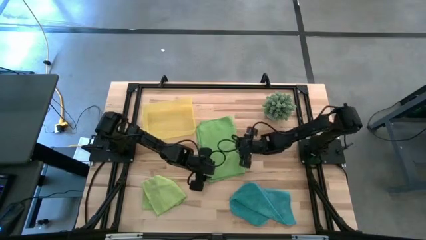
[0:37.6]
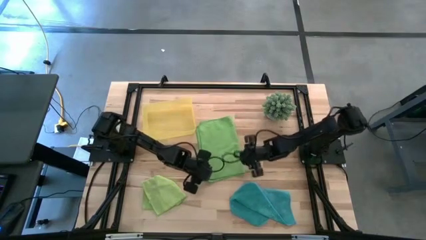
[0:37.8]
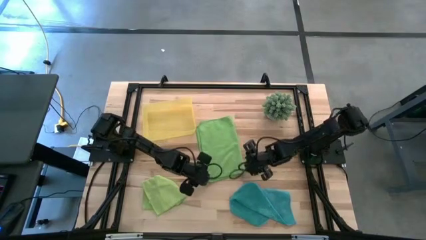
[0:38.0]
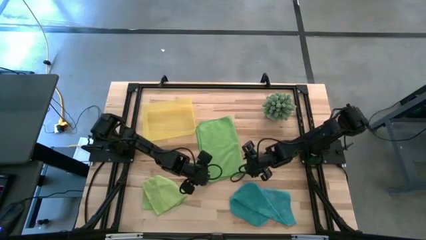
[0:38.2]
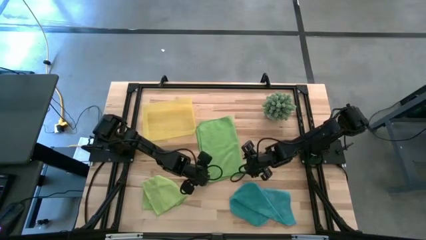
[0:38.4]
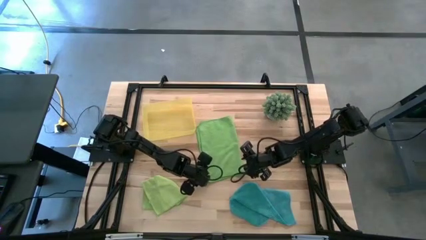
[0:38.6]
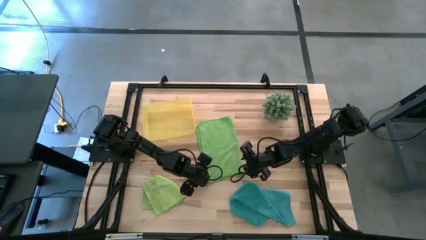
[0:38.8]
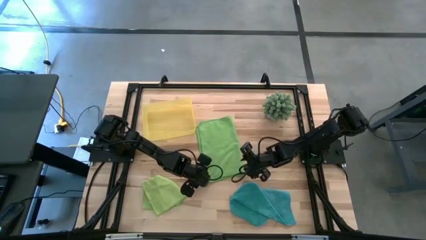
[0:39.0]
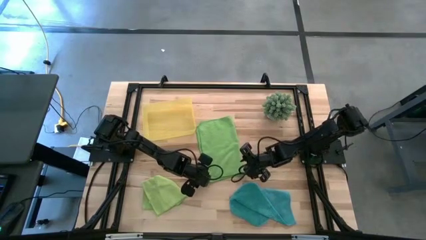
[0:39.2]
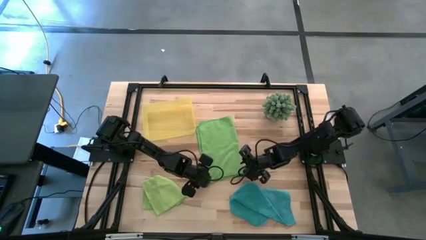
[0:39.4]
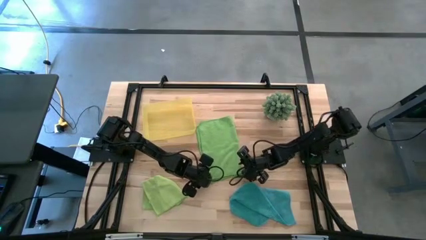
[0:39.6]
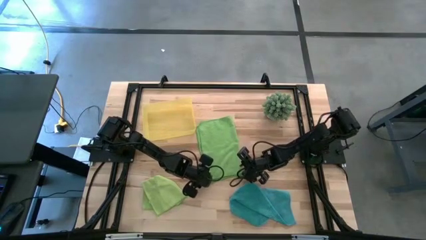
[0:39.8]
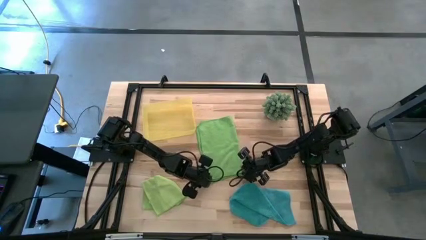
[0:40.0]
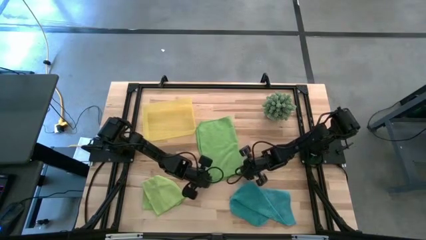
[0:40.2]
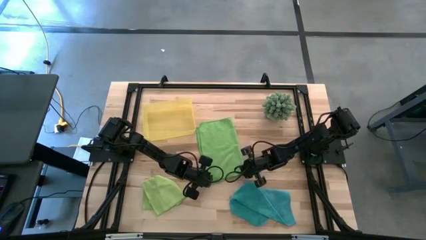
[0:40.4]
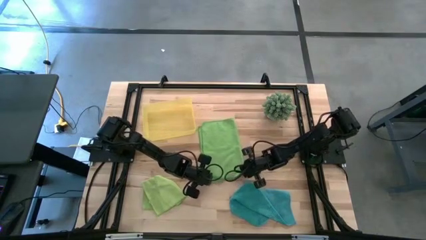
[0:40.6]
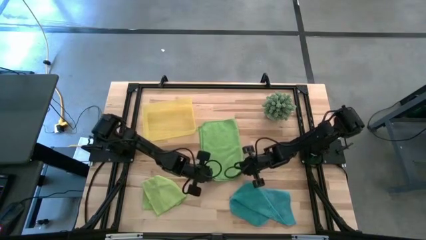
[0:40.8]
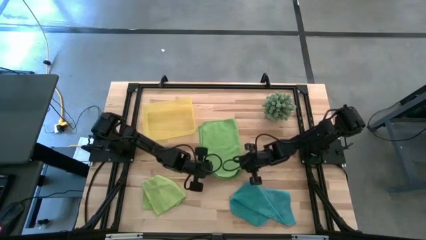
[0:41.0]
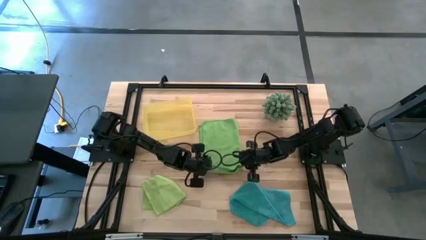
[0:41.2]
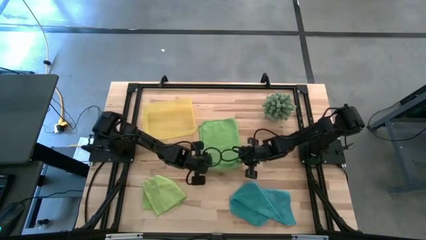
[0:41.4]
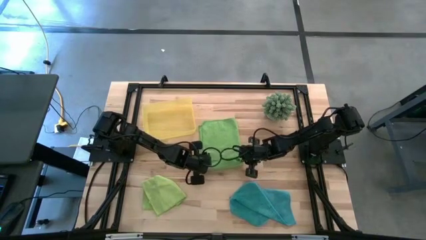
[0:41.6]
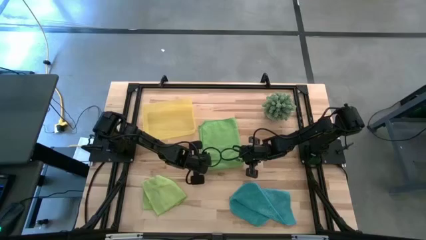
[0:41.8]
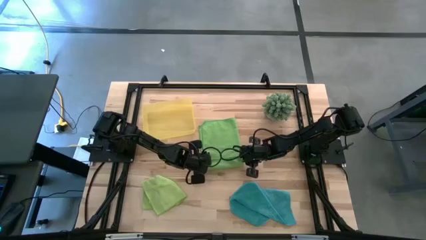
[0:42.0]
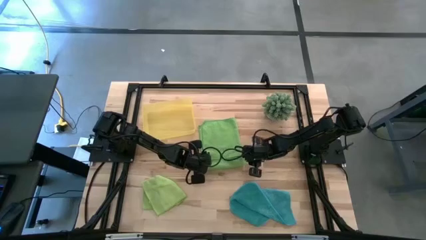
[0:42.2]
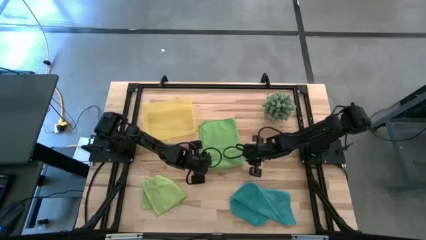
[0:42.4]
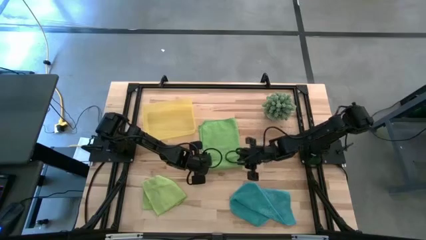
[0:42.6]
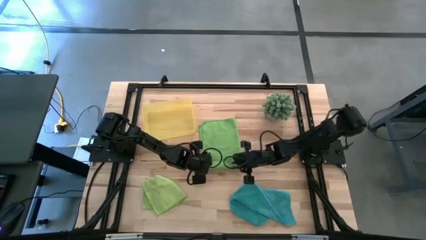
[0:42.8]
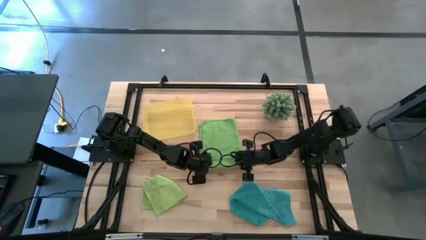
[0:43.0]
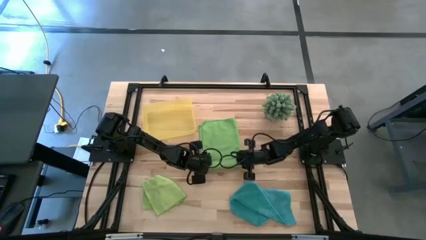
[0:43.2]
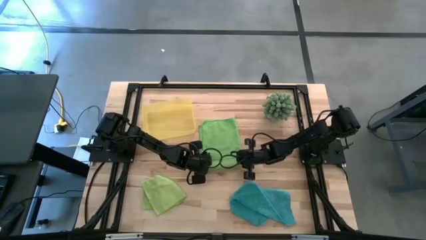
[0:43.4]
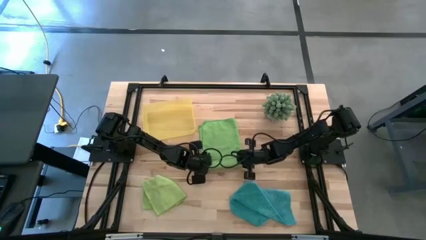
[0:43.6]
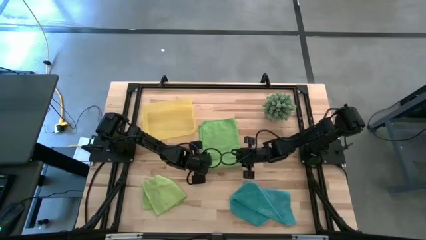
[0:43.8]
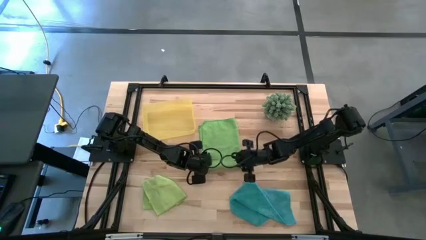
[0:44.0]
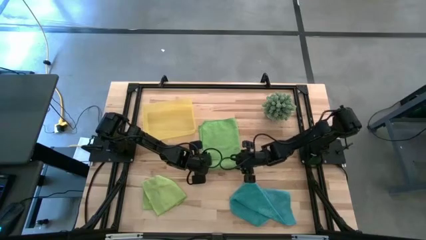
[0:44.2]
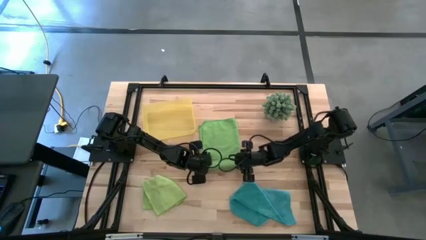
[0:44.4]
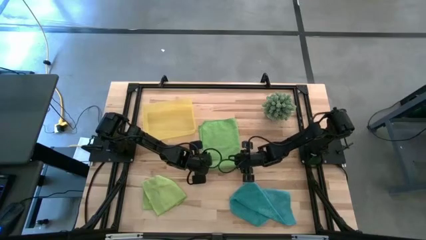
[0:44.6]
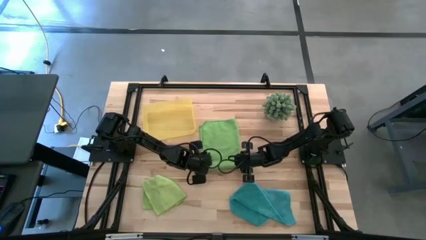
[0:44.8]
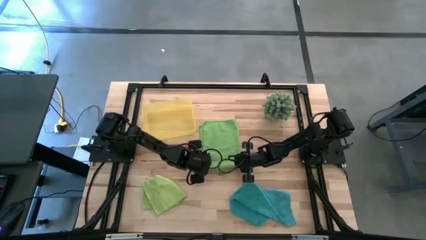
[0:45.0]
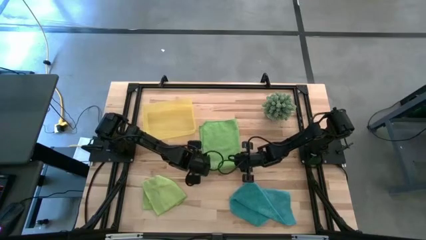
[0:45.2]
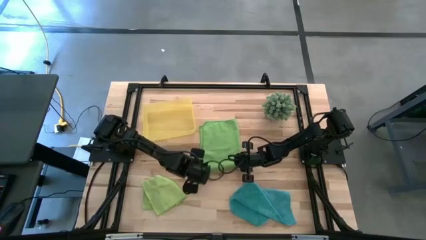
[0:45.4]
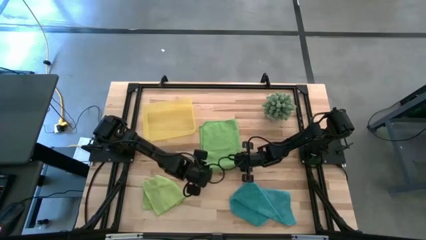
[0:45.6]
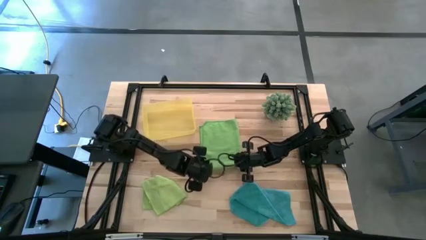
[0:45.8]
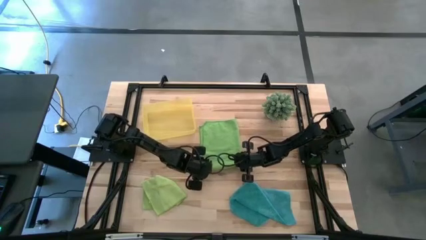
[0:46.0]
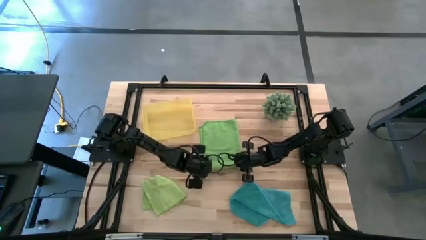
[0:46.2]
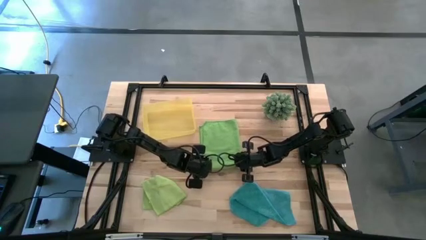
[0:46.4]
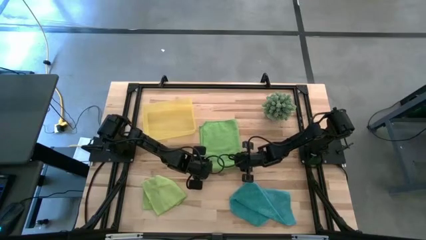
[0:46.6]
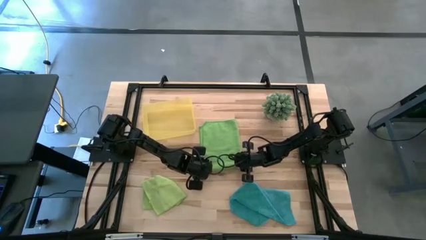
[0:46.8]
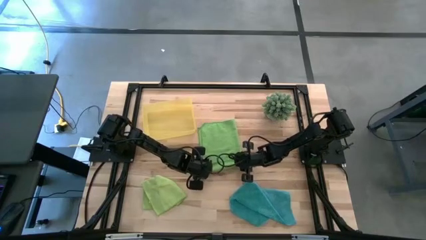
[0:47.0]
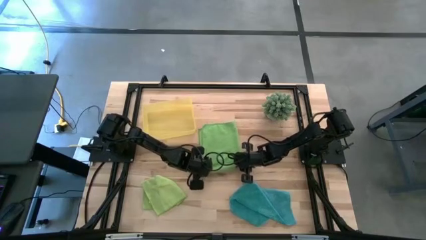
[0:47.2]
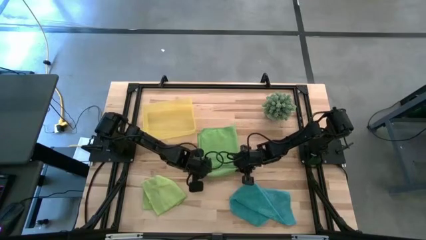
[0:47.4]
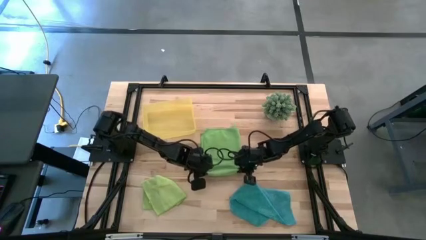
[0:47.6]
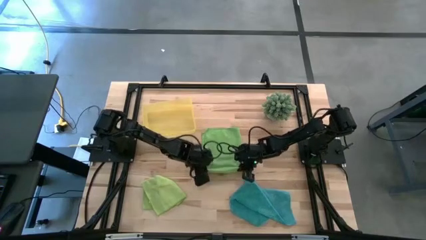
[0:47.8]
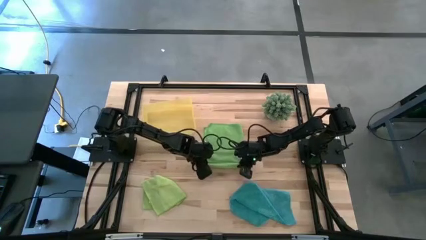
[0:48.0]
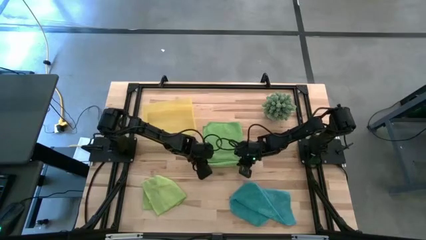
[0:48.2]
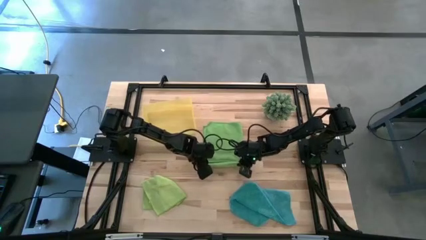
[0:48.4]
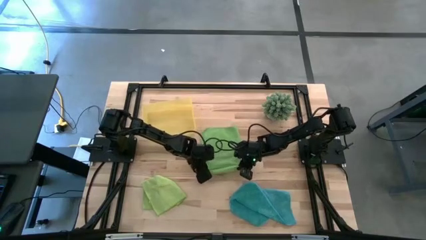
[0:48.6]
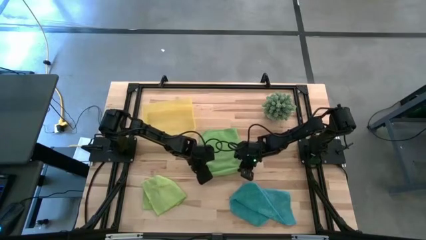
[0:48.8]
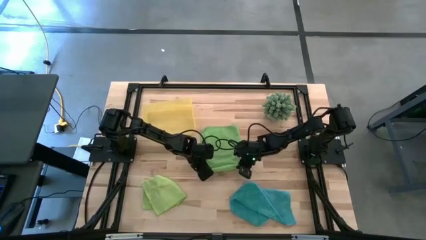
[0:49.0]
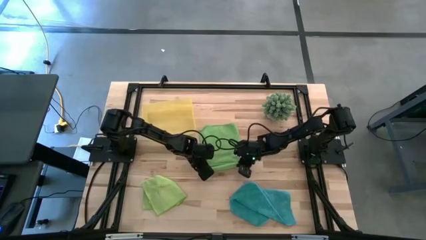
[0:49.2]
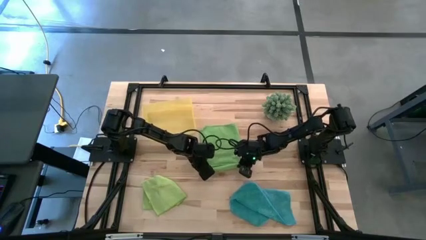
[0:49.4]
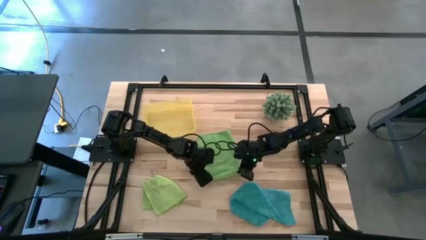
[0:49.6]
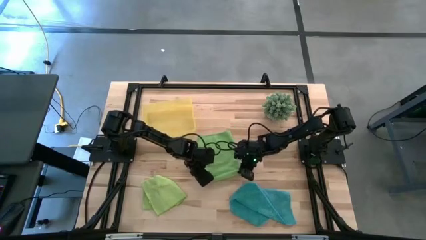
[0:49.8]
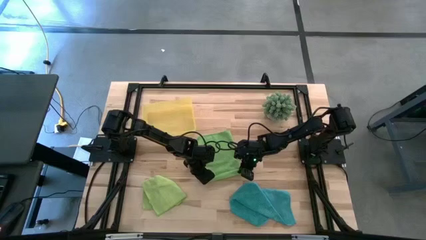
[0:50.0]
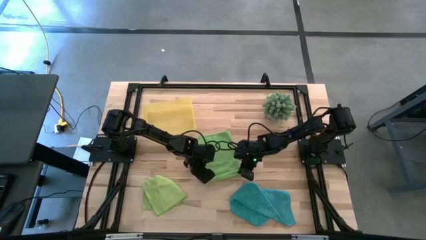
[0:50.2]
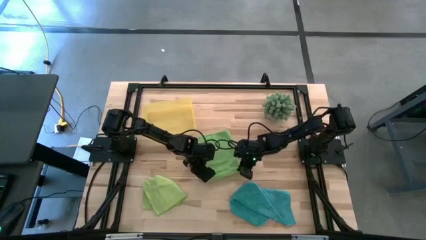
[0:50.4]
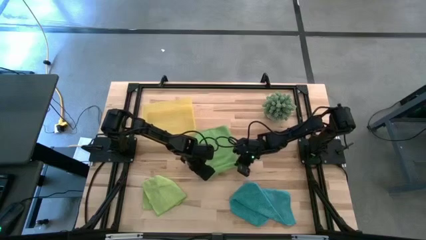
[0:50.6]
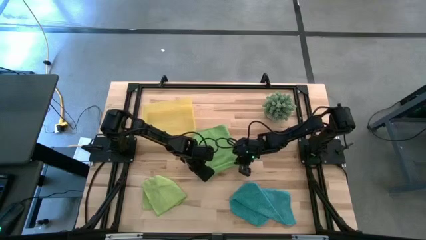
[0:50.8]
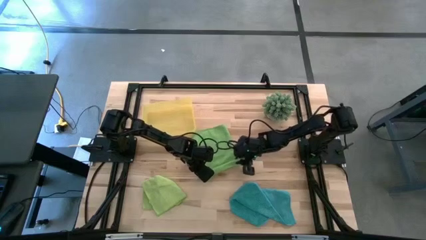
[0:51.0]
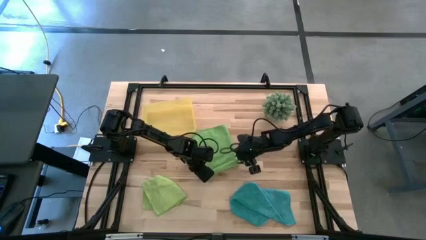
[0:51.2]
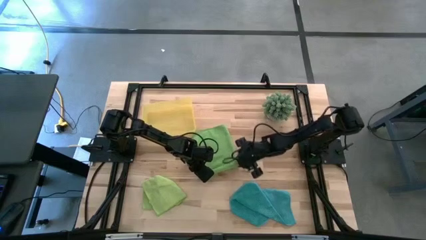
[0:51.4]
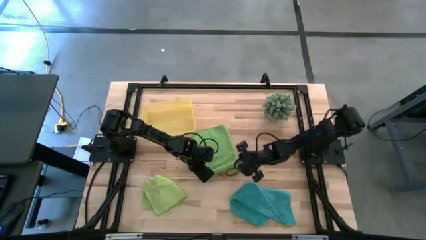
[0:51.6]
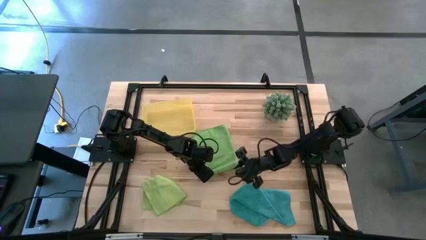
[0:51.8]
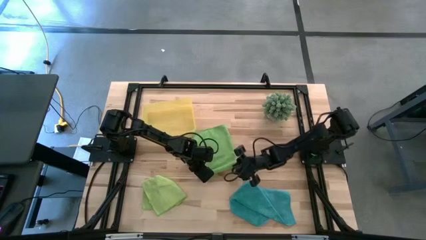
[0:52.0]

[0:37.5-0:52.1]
Task: Roll microfiber towels into tight, uniform cylinder then place into a basket
Roll the green microfiber towel
